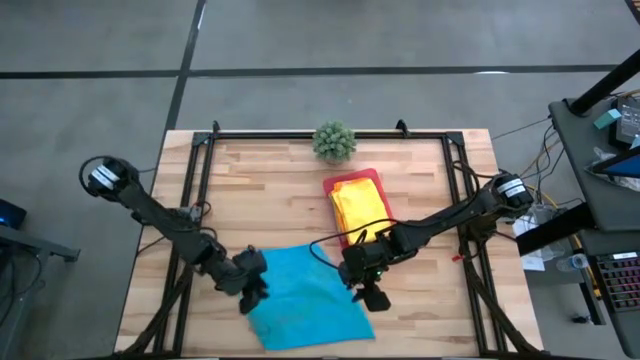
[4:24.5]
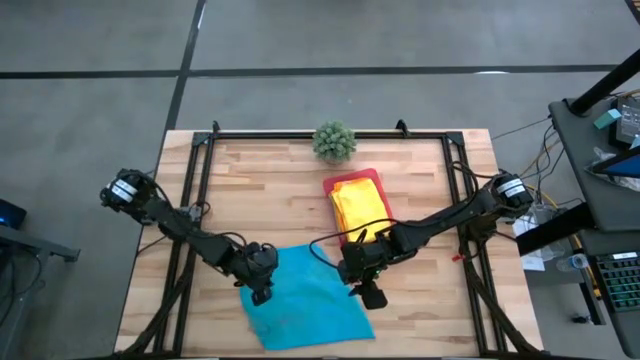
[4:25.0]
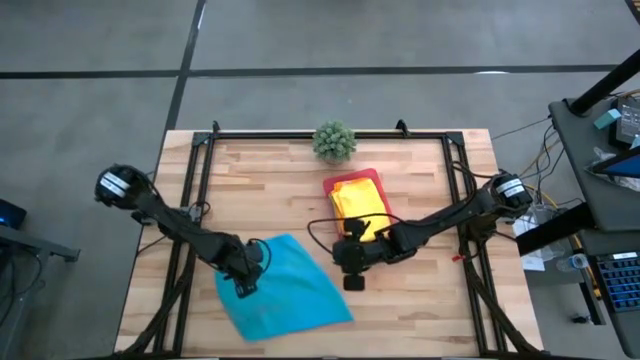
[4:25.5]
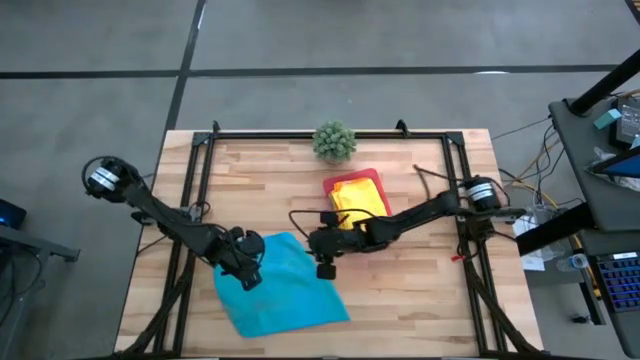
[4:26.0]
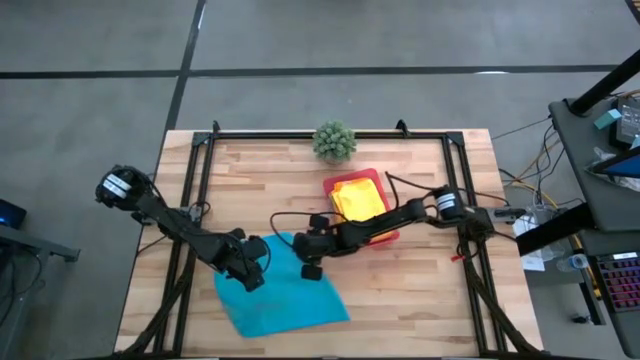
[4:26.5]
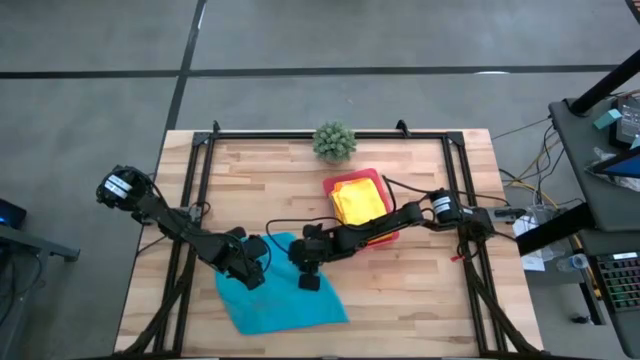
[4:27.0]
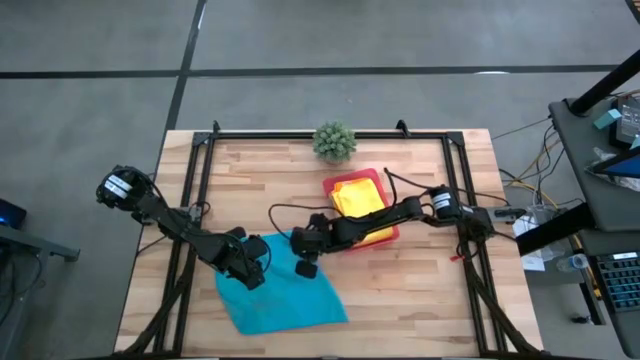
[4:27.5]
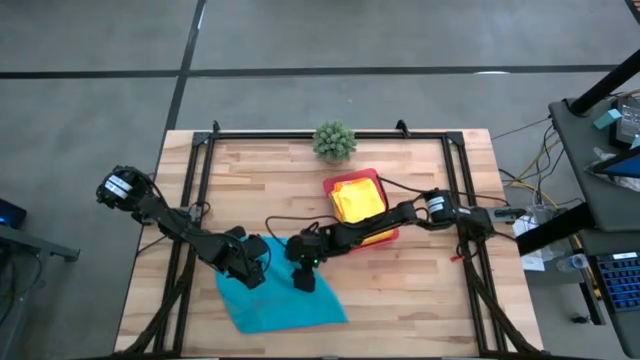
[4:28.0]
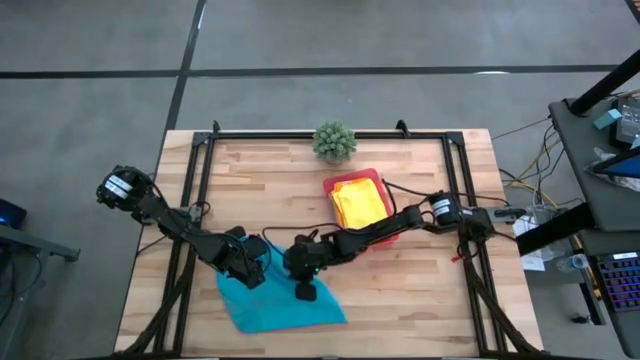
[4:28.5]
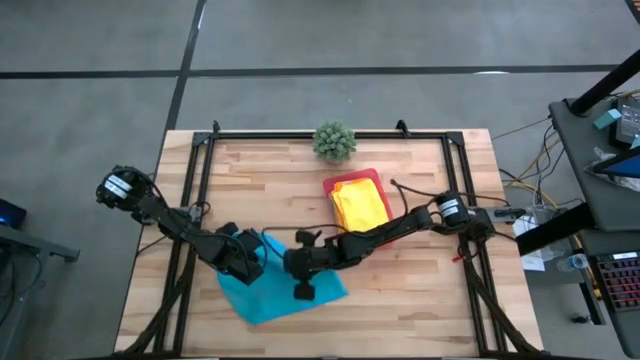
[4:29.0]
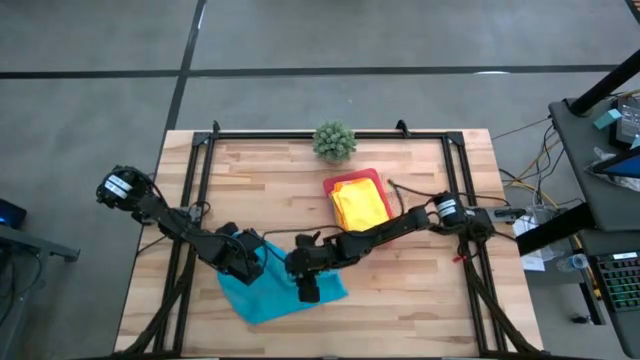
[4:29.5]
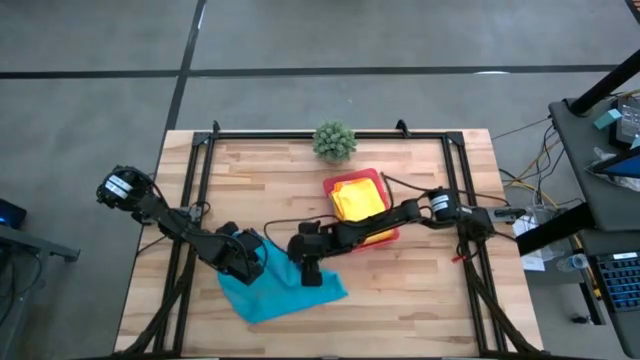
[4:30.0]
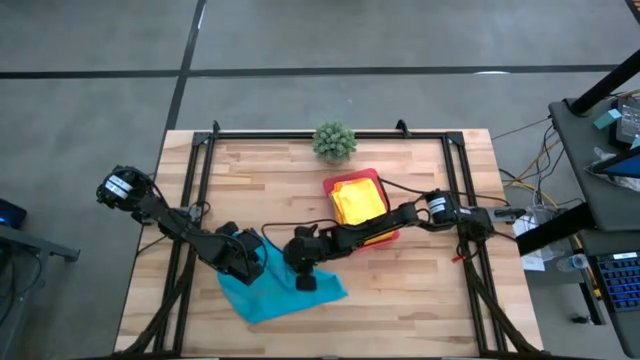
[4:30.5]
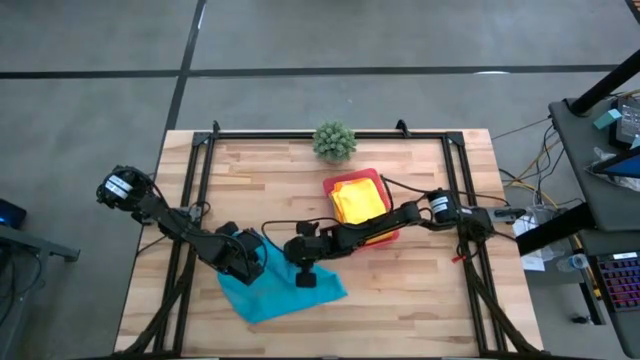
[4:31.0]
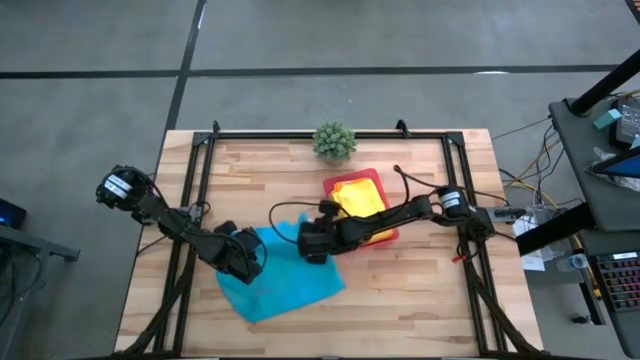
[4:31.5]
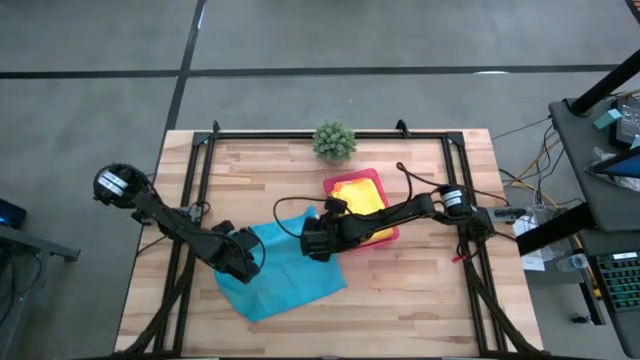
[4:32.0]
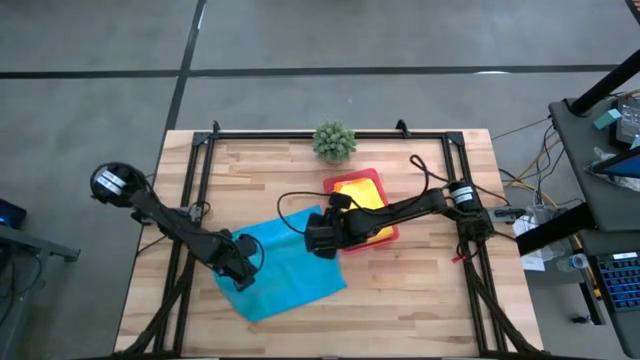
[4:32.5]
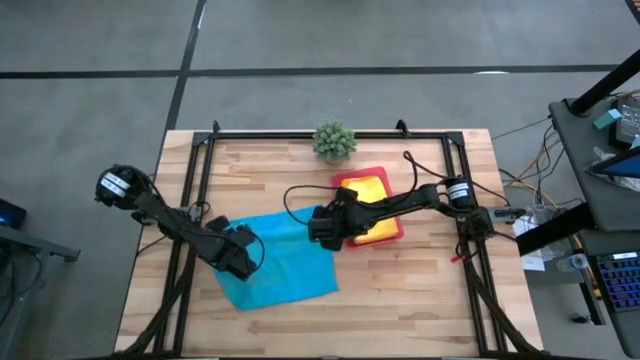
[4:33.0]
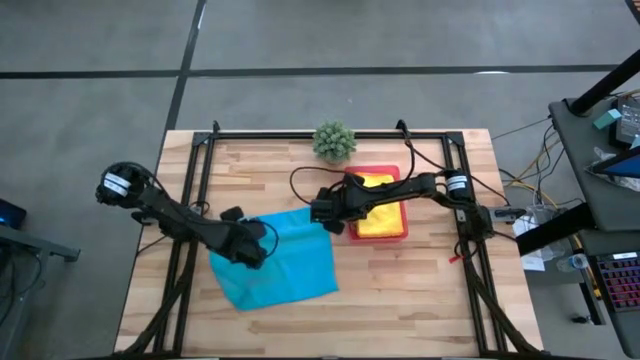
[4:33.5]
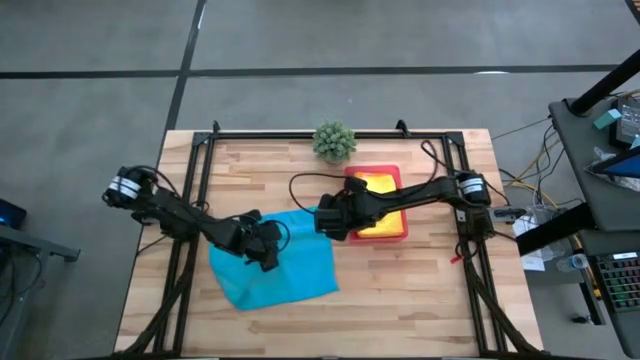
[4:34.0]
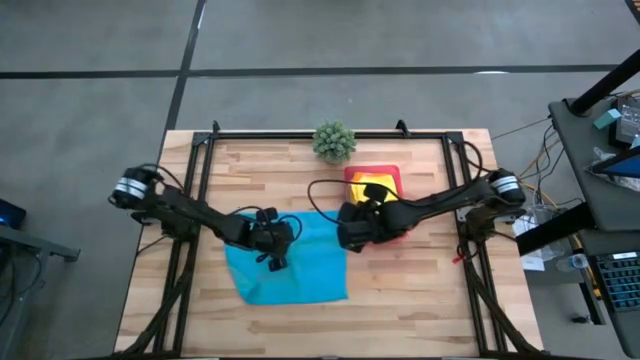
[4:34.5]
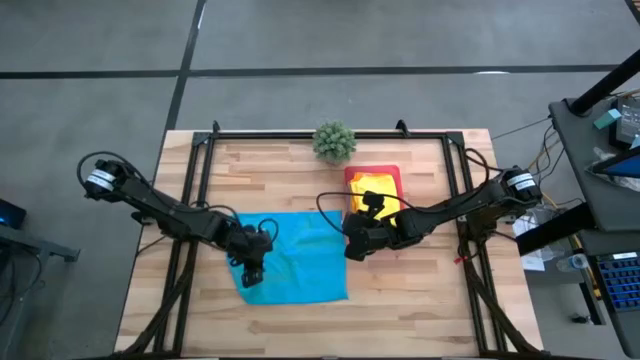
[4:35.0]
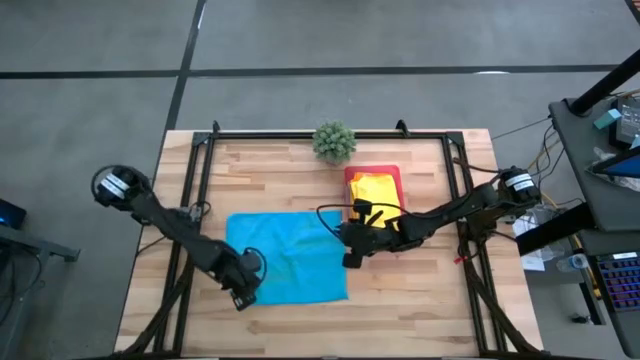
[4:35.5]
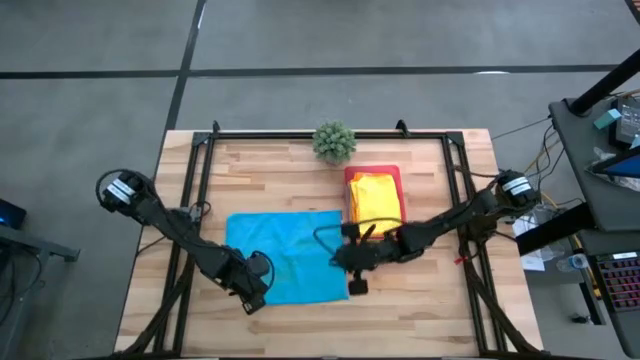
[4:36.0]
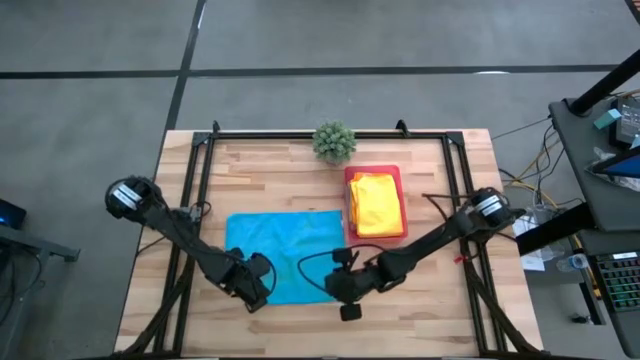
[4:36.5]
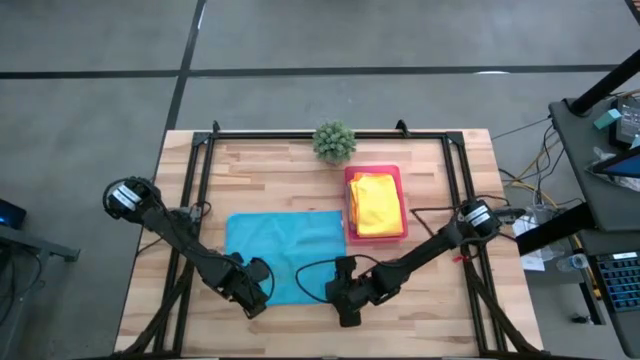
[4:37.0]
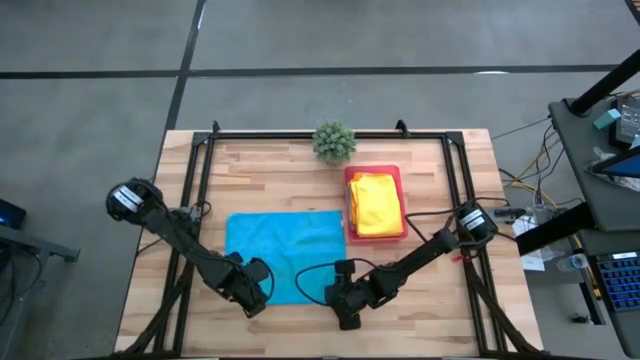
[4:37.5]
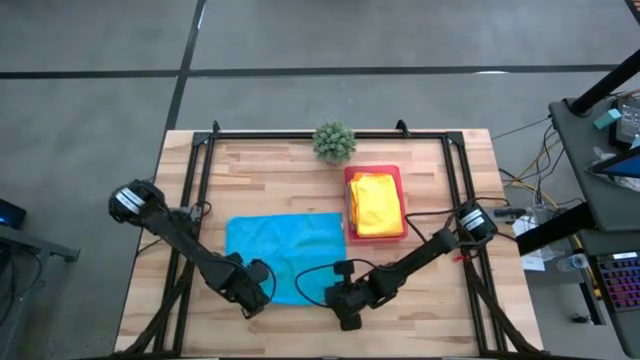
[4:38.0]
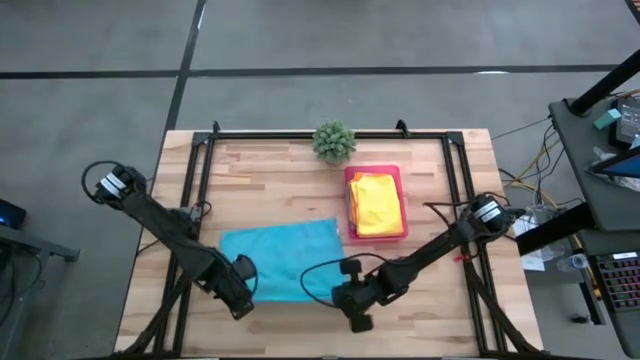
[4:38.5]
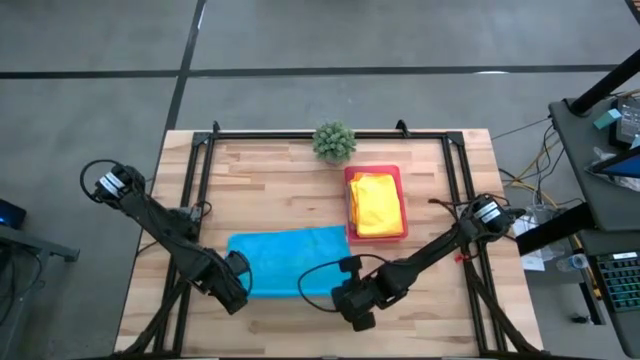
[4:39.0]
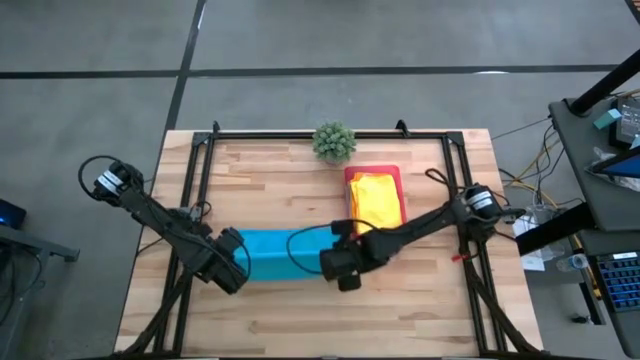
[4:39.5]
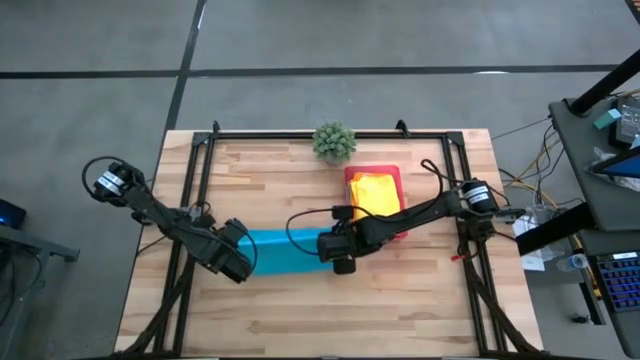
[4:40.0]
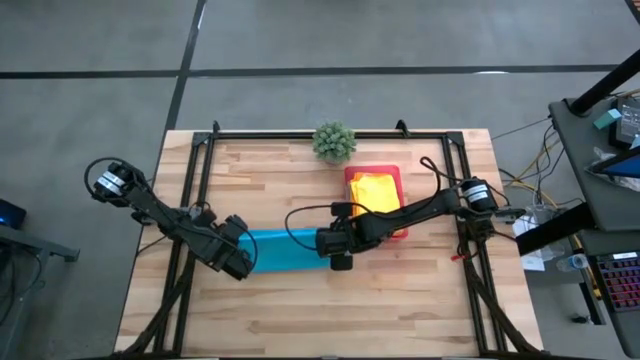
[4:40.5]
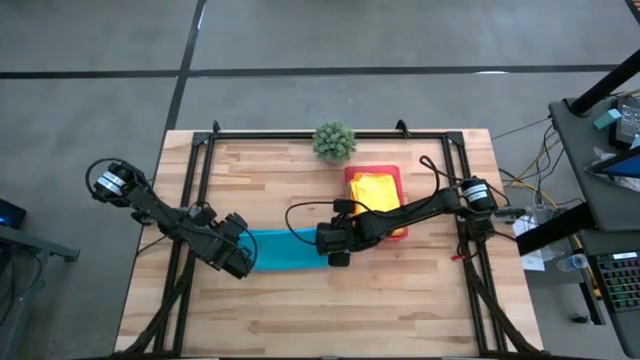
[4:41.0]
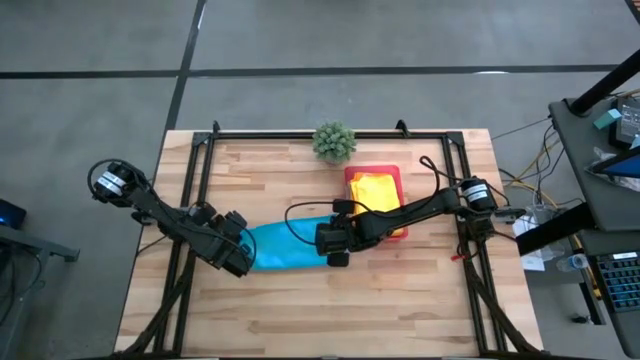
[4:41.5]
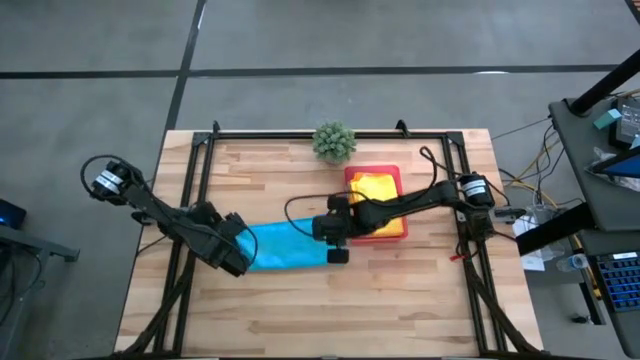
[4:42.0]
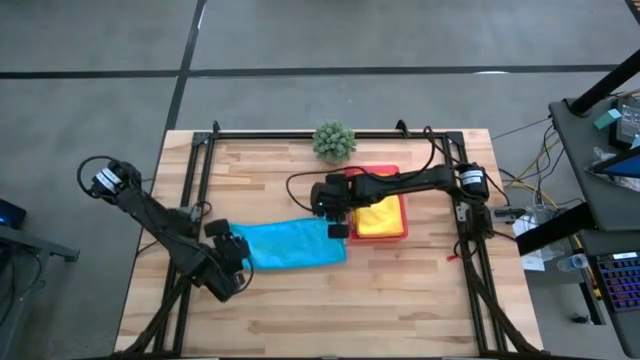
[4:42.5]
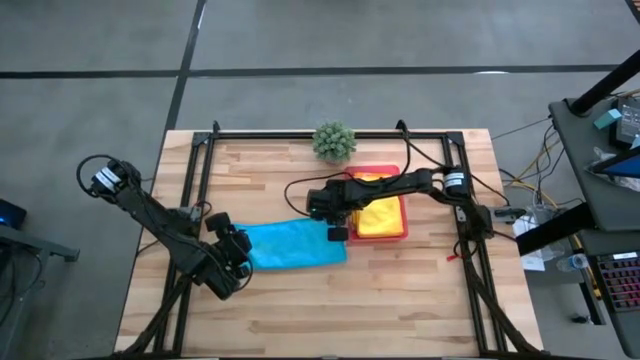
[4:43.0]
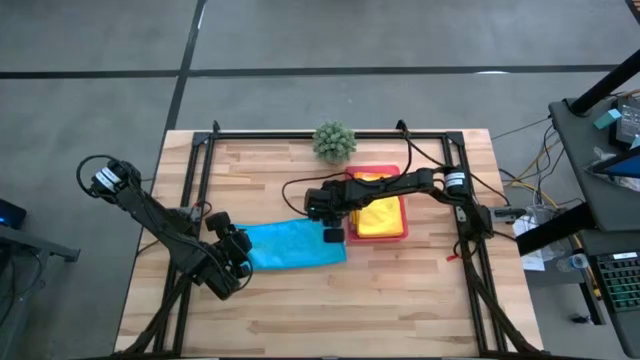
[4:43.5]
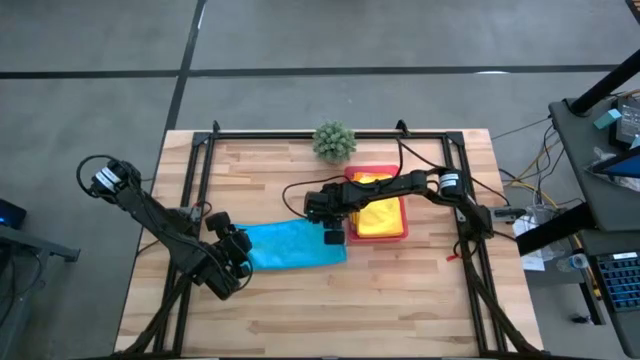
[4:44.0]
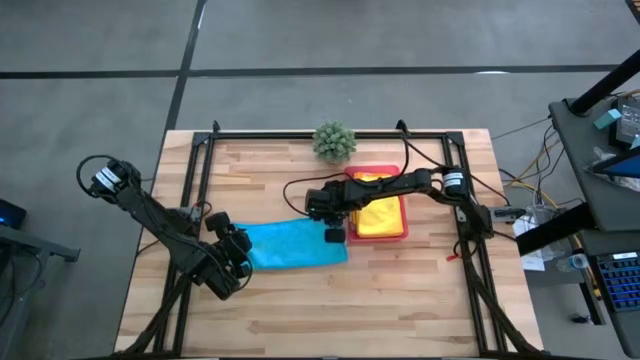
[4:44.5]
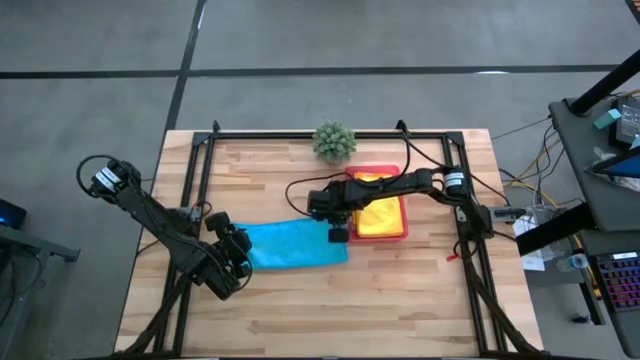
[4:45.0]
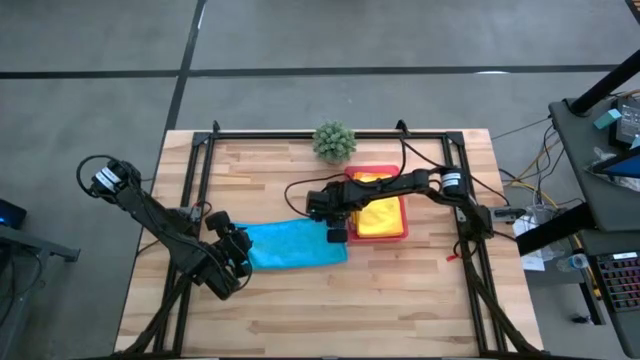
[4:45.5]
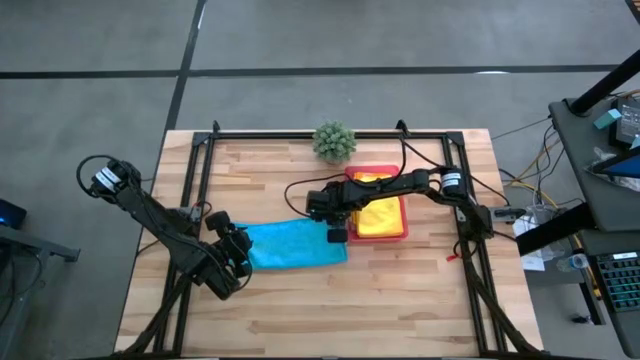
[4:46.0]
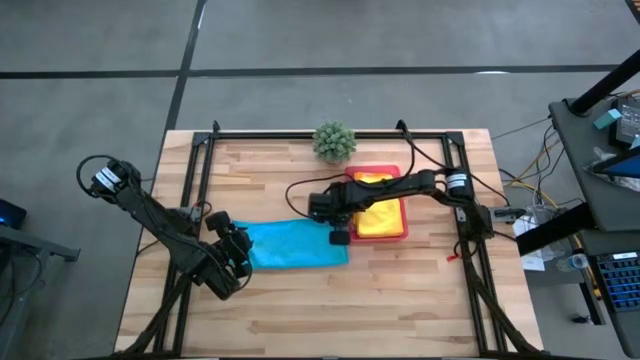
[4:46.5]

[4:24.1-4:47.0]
Task: Fold microfiber towels
Fold the blue towel
